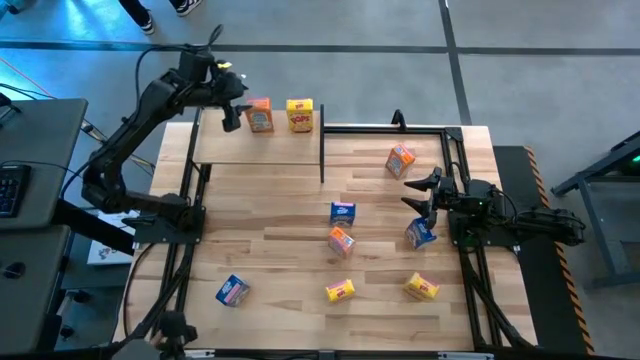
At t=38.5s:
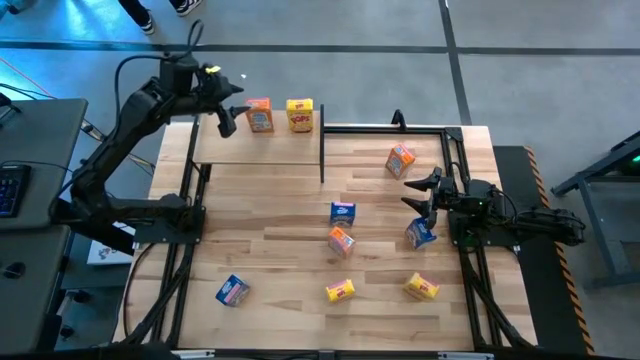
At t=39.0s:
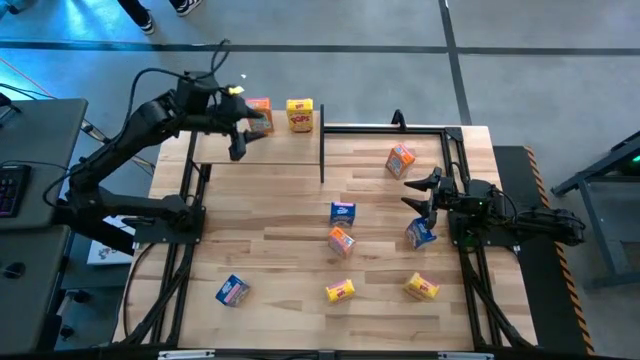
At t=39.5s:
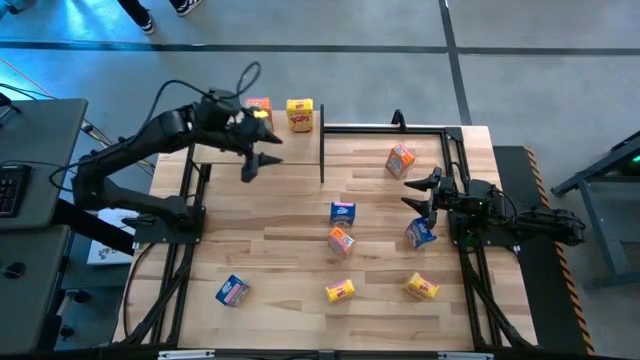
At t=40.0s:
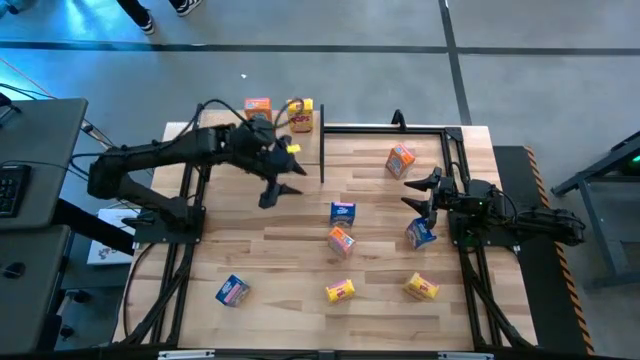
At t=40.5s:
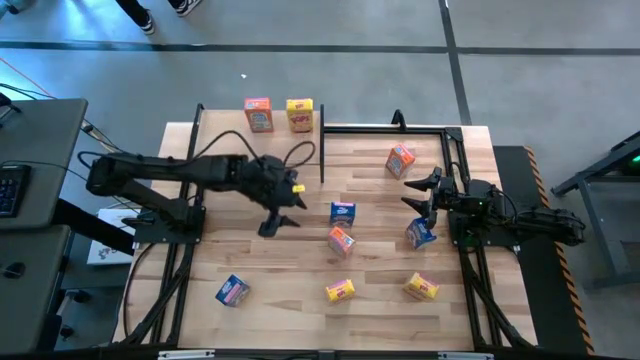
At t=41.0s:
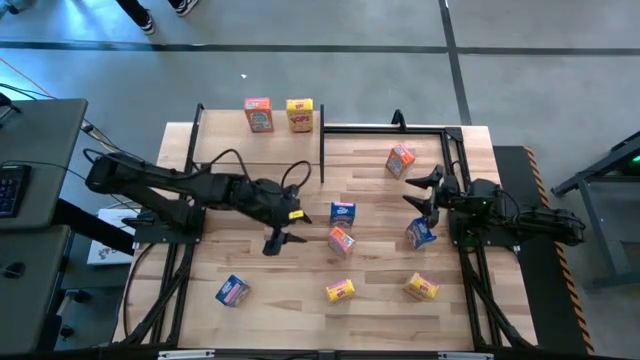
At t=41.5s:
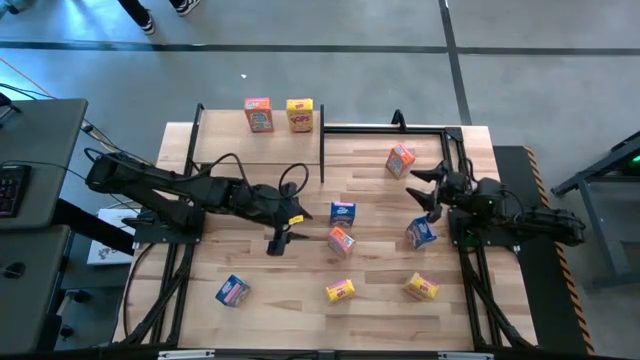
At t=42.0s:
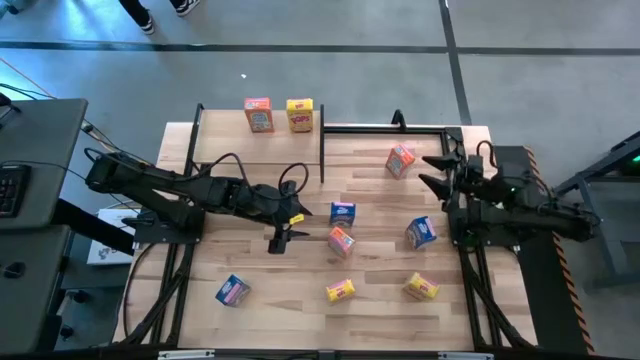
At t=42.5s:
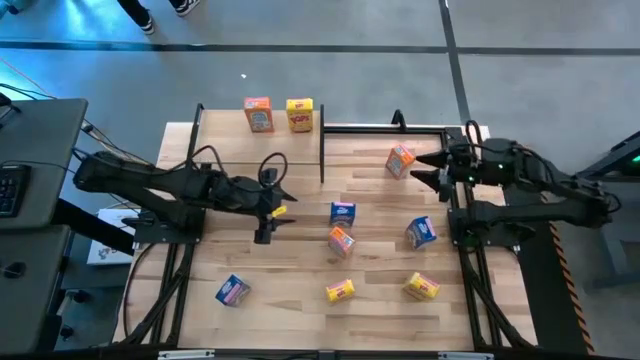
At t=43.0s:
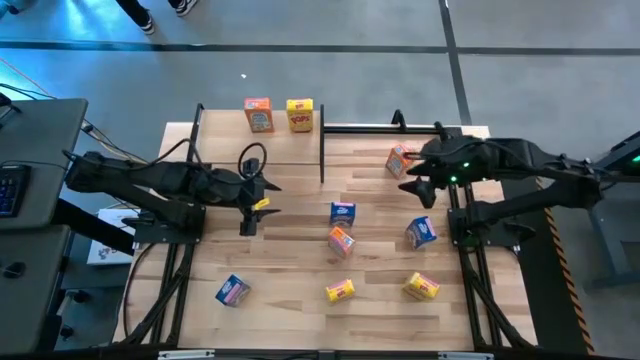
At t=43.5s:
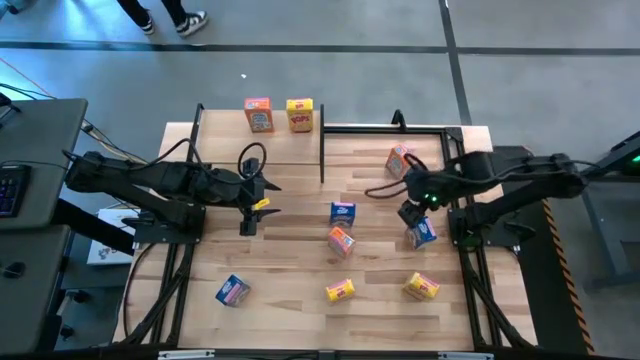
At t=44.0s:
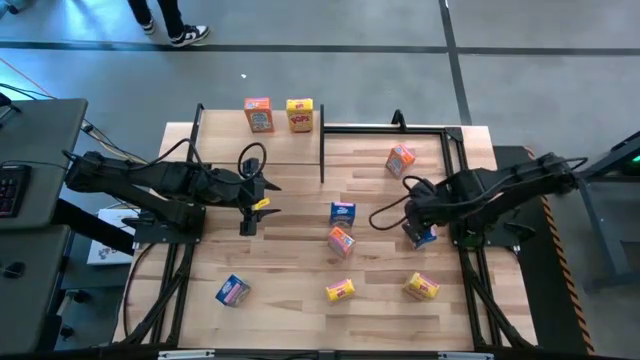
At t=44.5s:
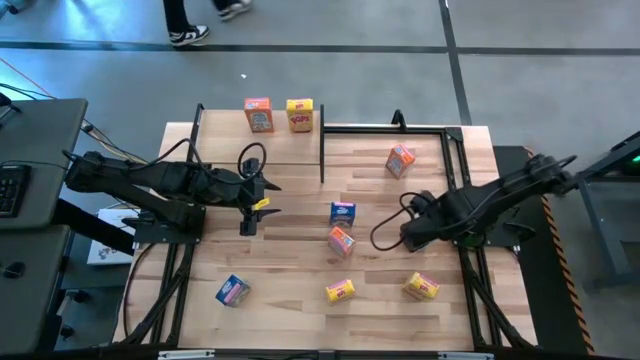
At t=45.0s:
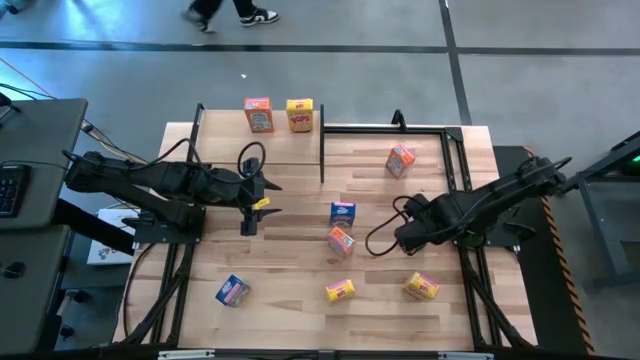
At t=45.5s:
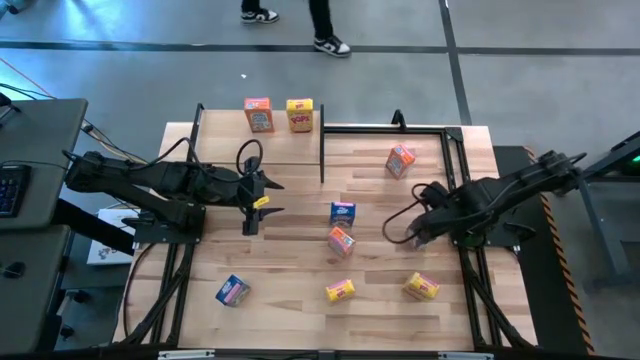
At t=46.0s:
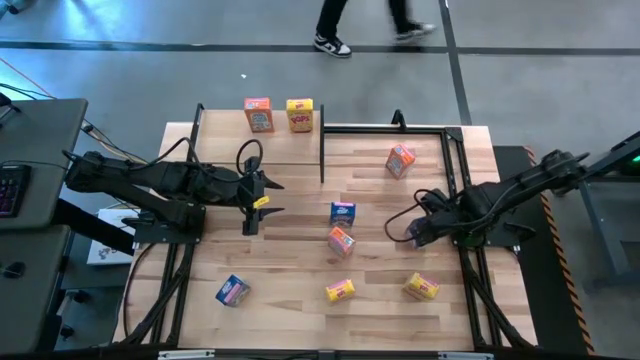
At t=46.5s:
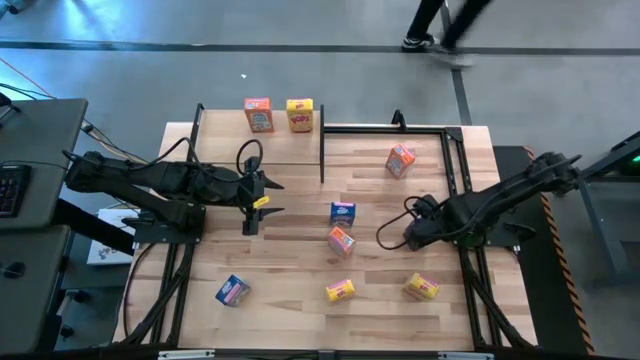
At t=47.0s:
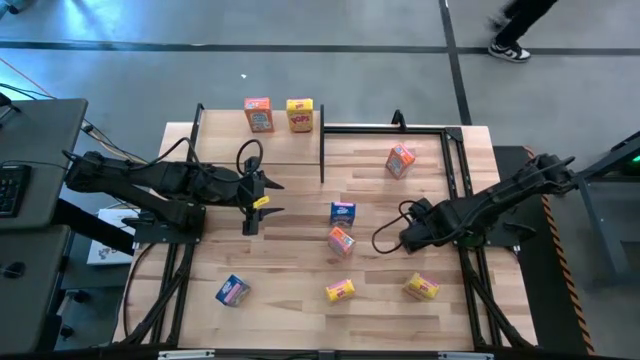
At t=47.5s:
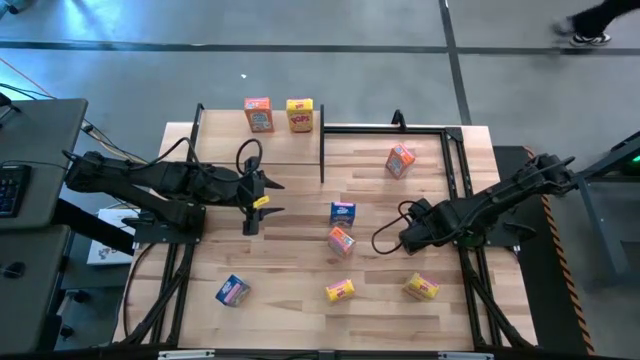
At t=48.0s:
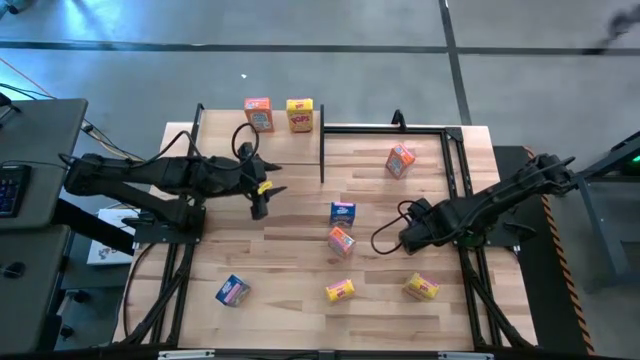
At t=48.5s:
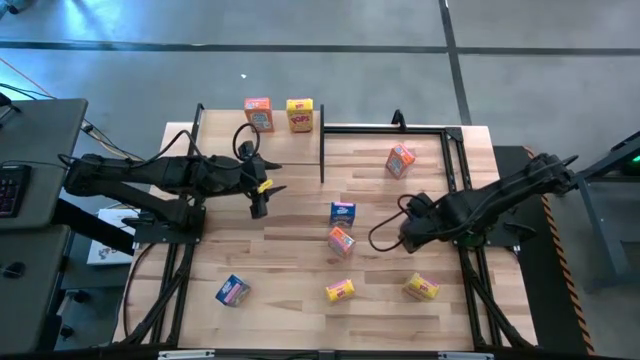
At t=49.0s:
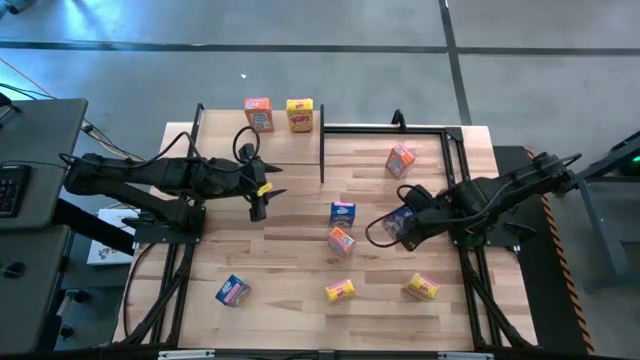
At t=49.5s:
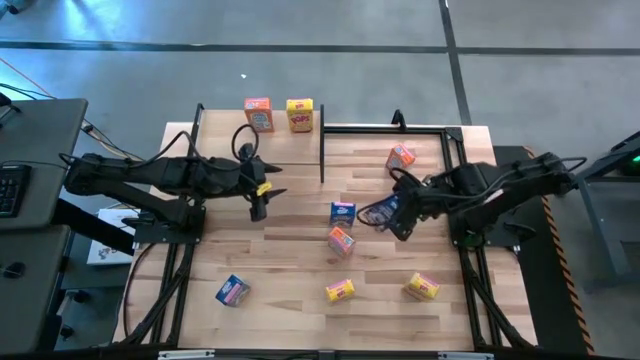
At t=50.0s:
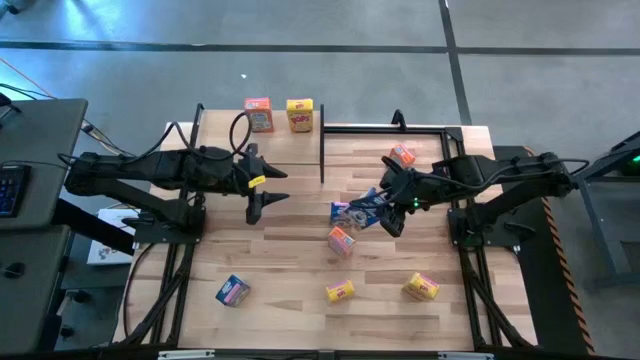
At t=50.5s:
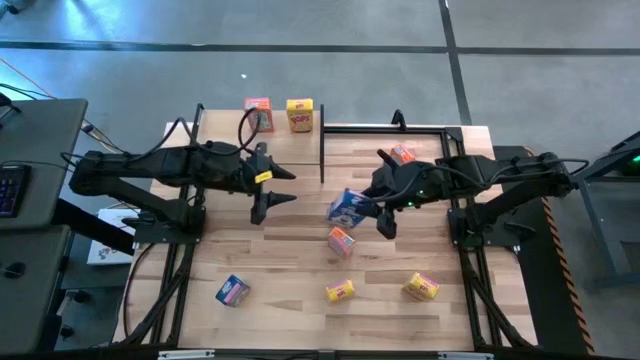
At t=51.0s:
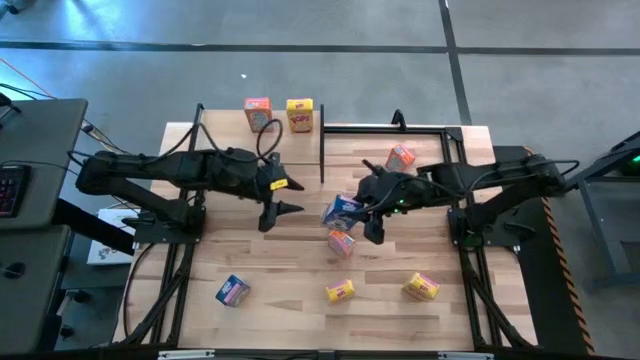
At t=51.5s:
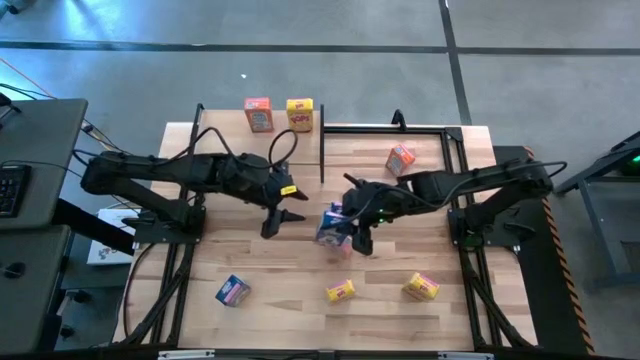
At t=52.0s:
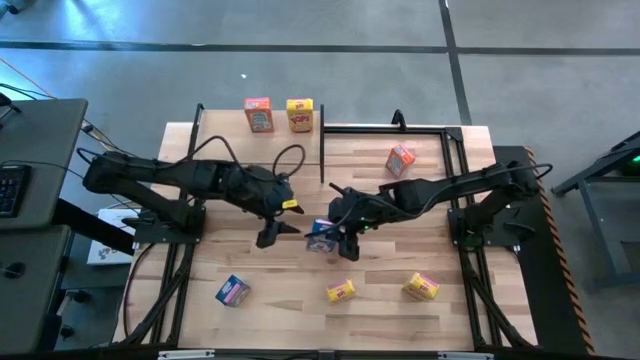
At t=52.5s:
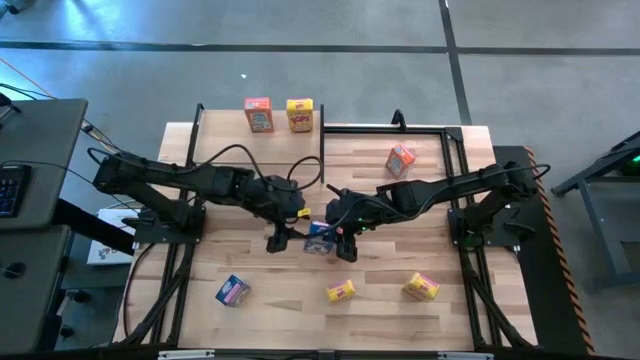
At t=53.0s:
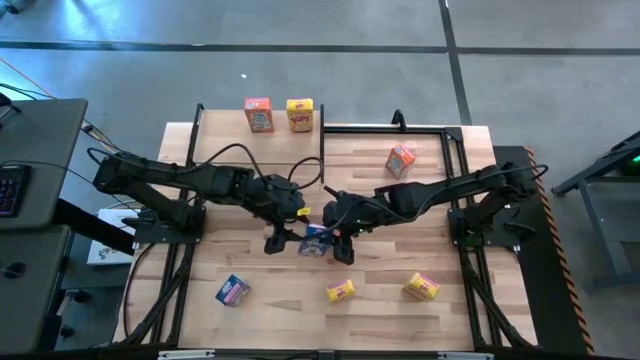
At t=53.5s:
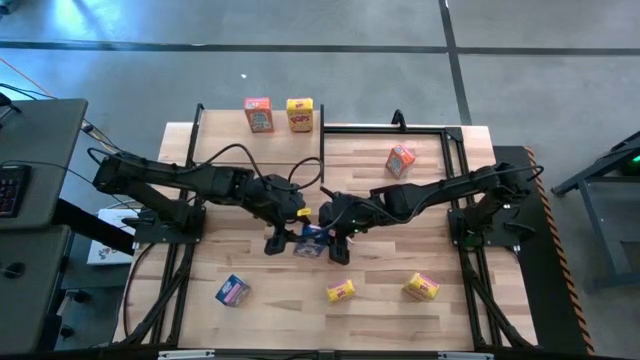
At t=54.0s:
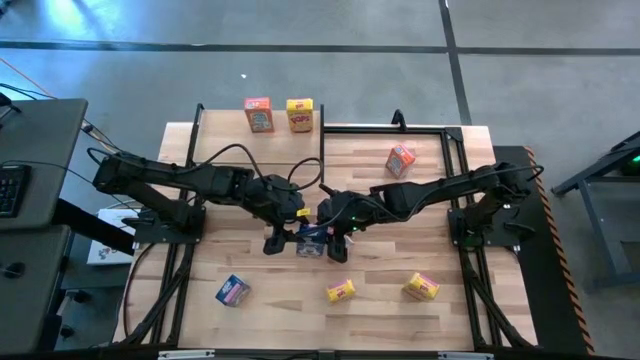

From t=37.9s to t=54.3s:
Task: Stack cereal on shelf
Put the right blue cereal box on the shelf

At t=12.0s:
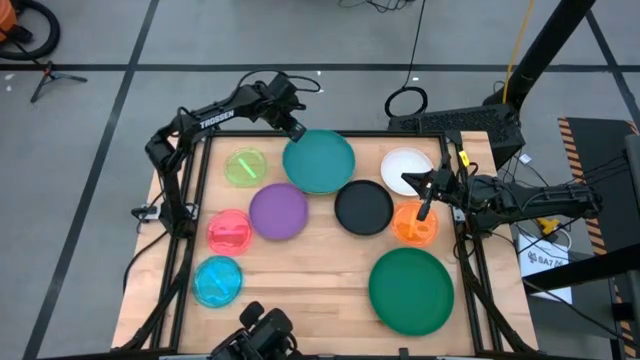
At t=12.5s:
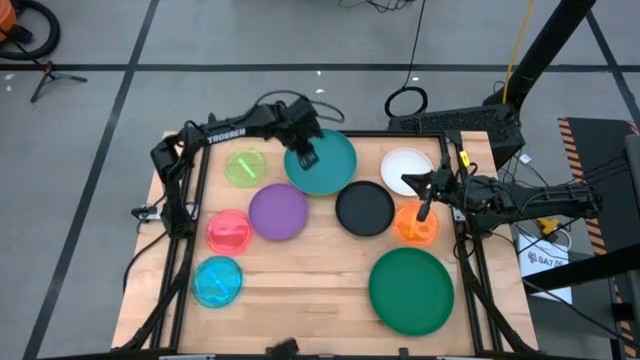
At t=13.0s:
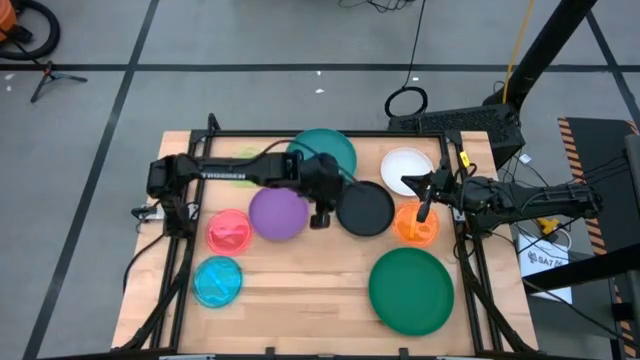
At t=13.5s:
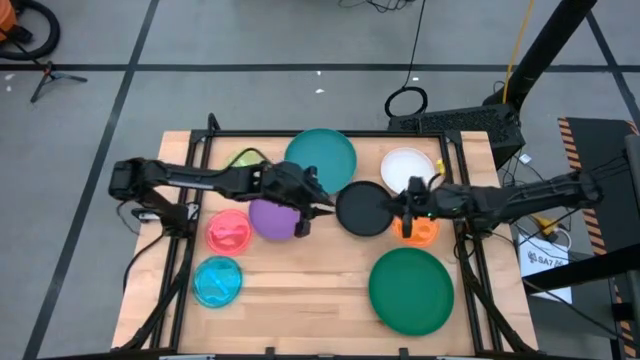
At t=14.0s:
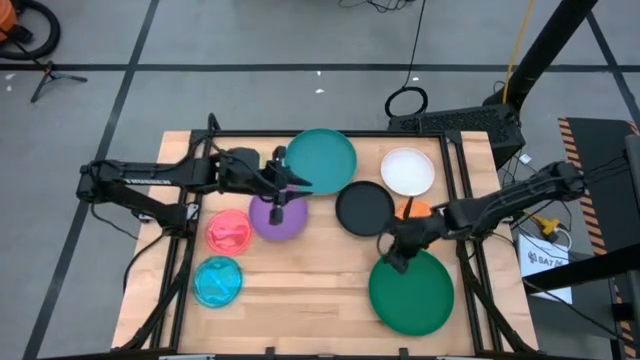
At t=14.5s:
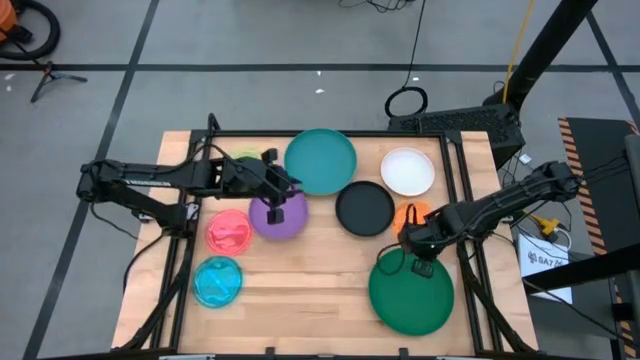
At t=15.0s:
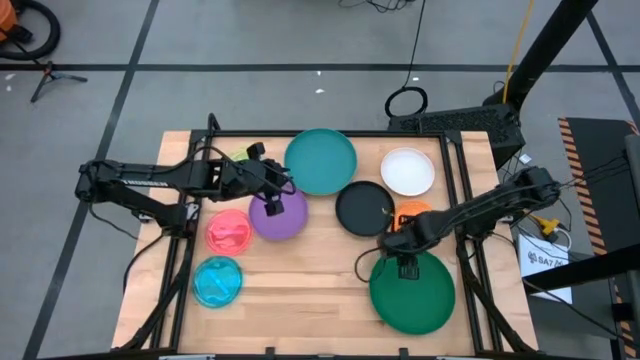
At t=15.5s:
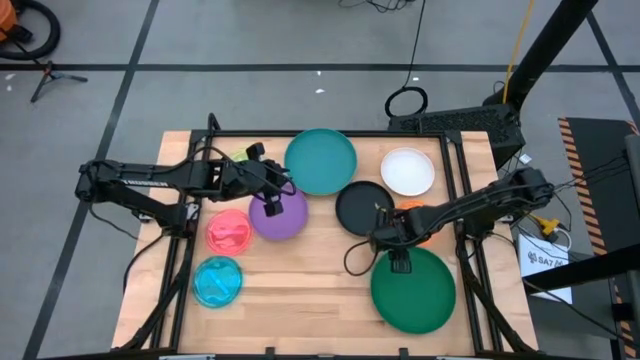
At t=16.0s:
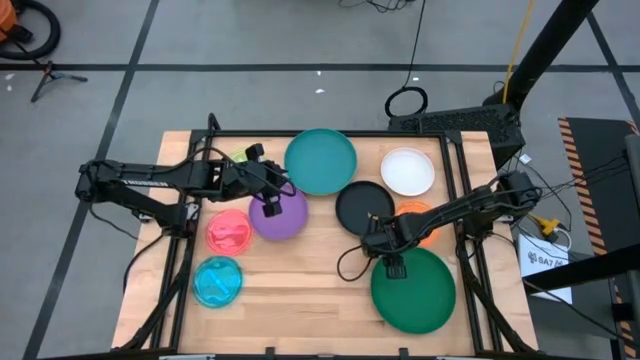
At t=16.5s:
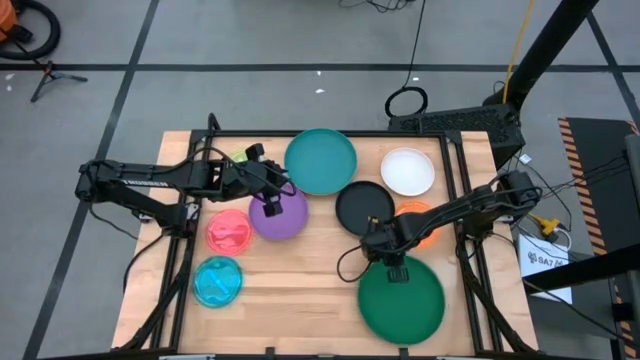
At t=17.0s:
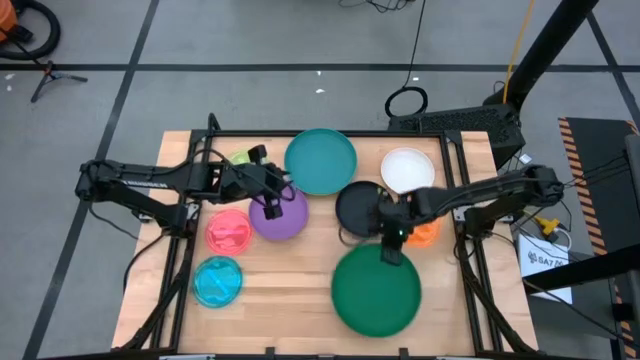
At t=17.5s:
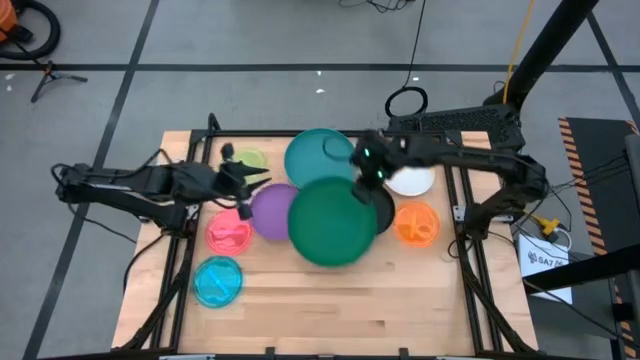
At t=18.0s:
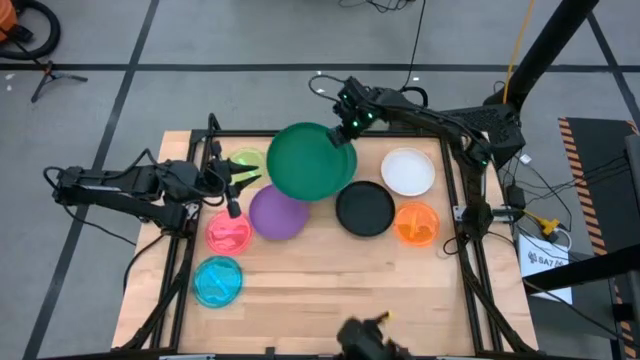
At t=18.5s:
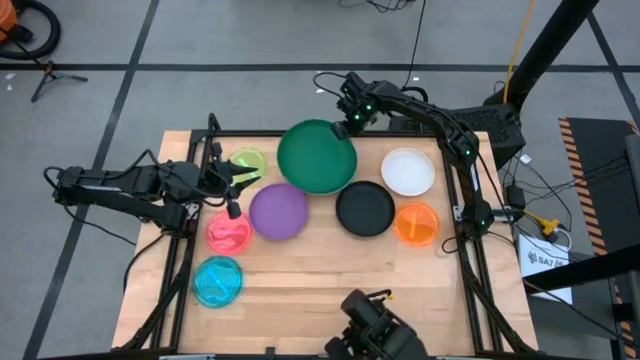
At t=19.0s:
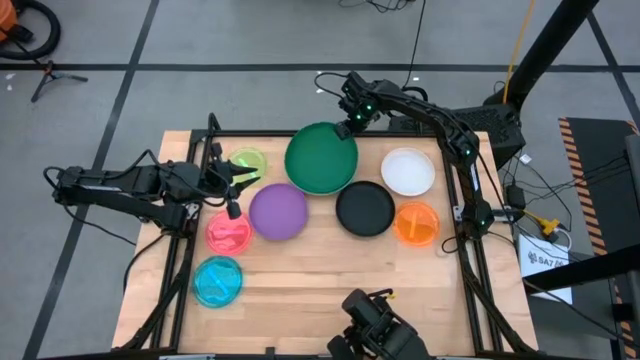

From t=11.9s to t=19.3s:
Task: Stack plastic plates
Stack the dark green plate on top of the blue plate
